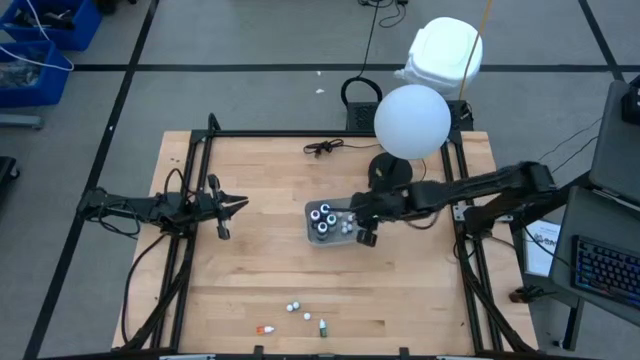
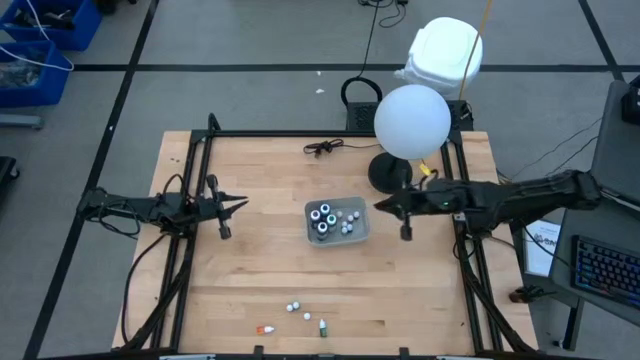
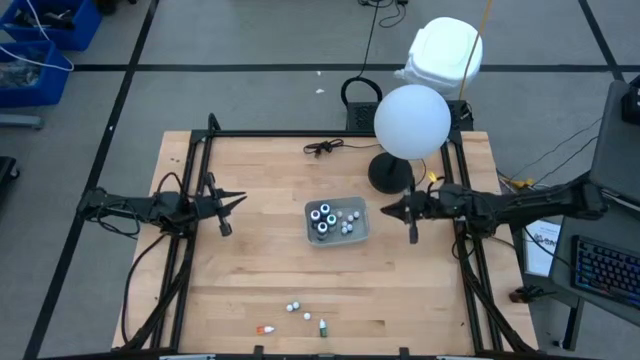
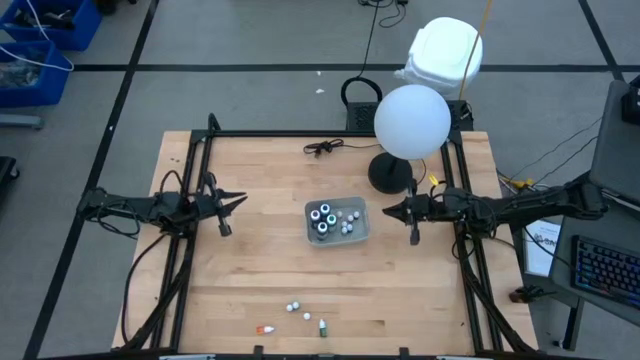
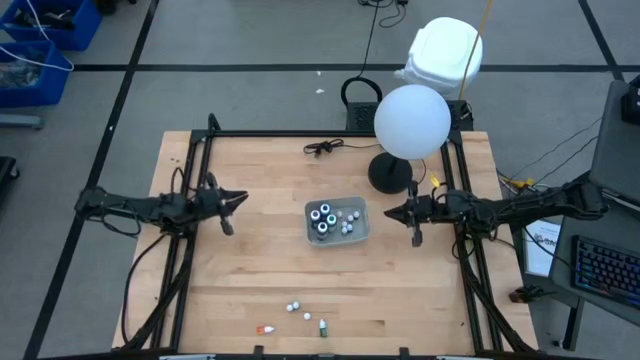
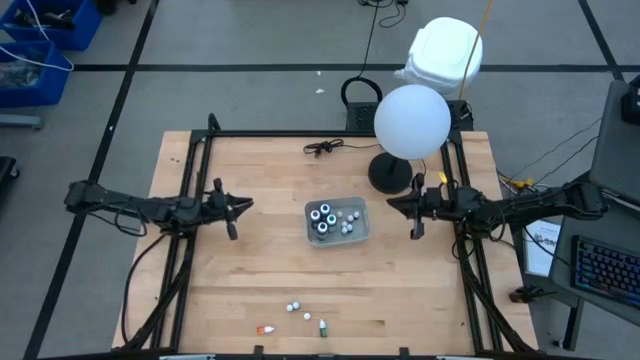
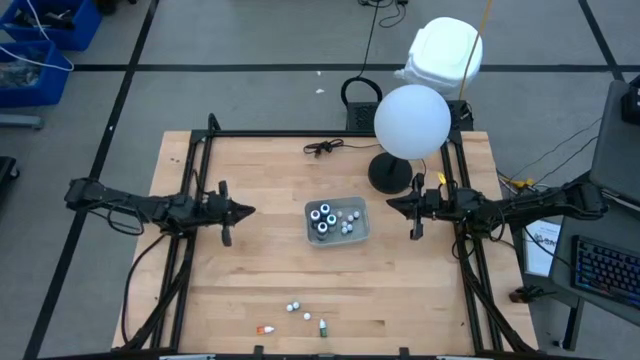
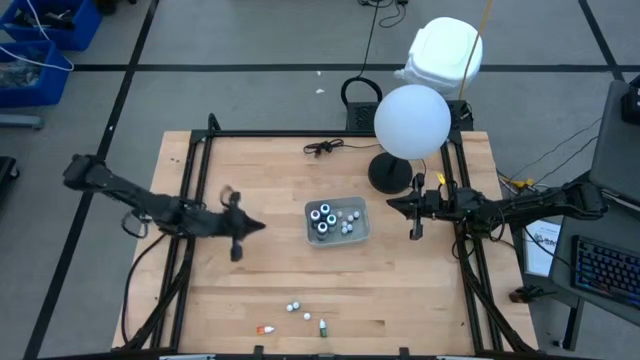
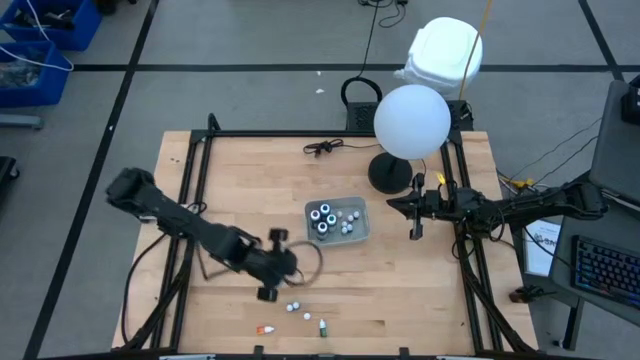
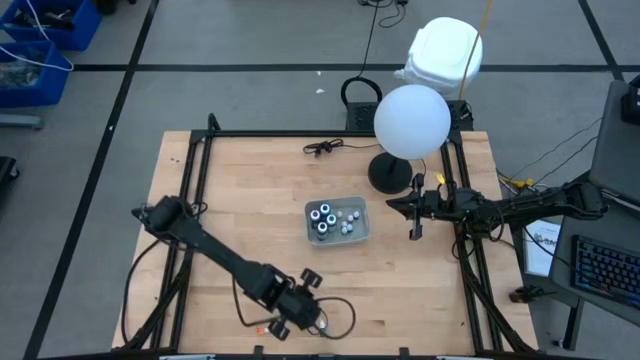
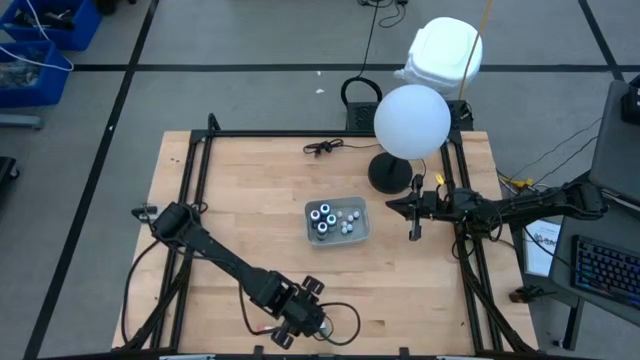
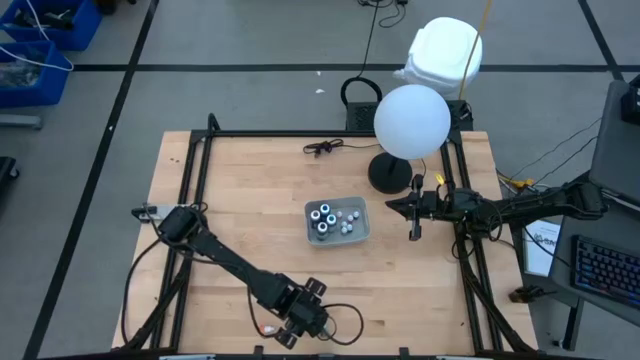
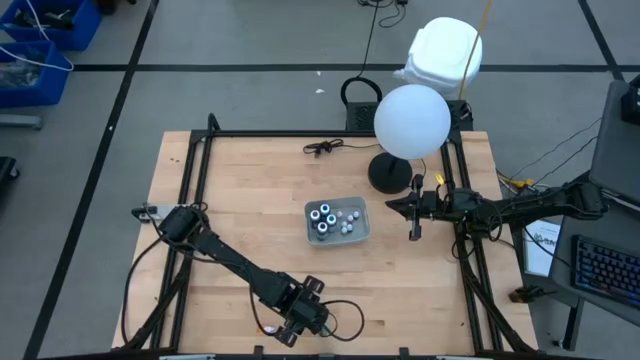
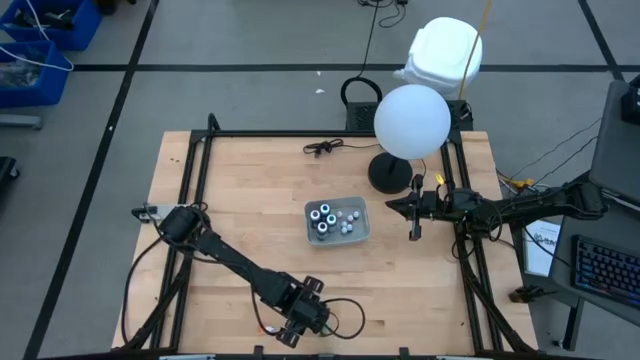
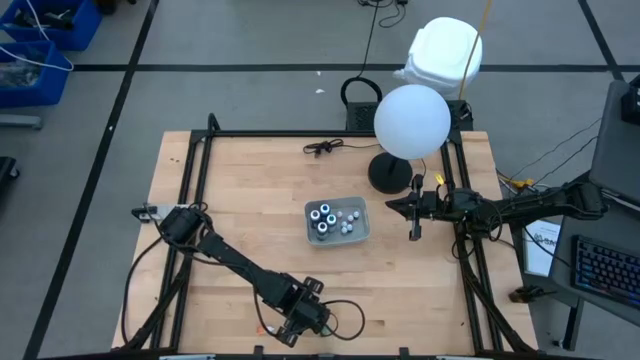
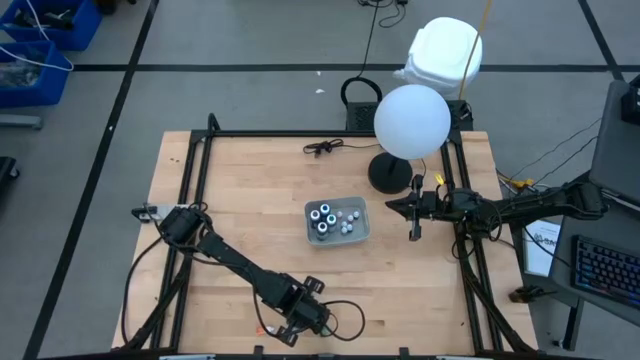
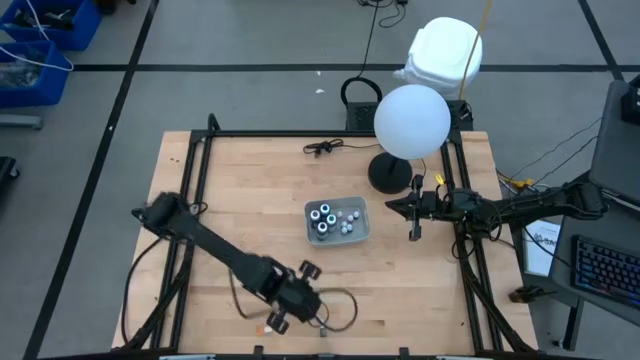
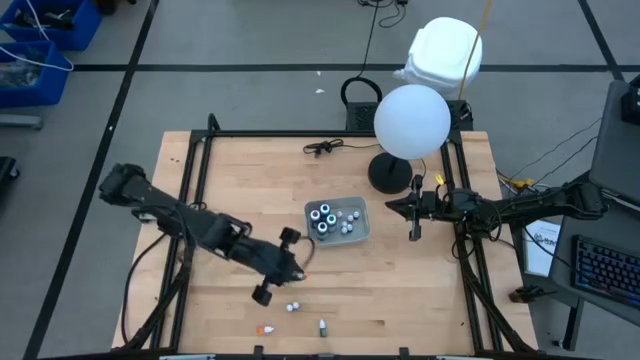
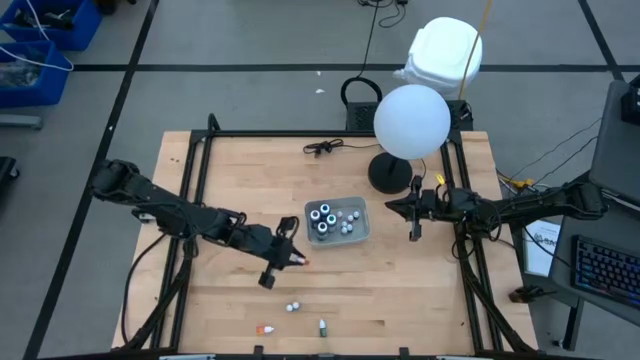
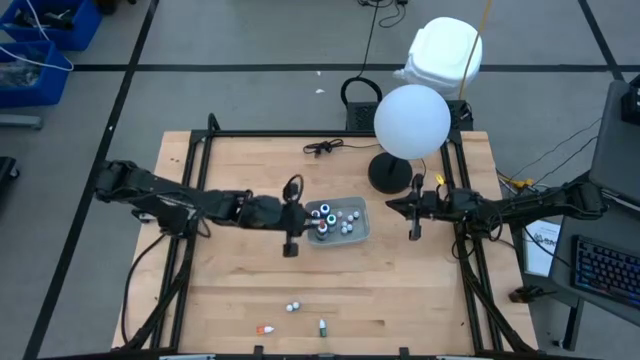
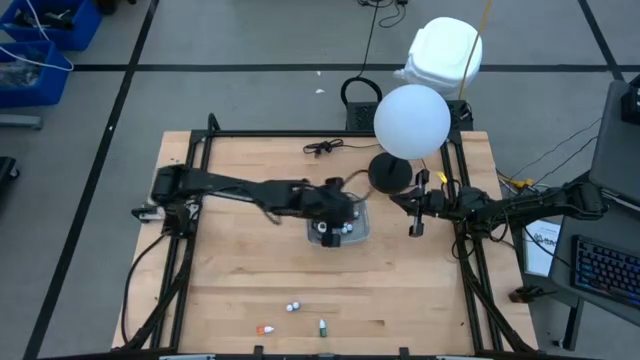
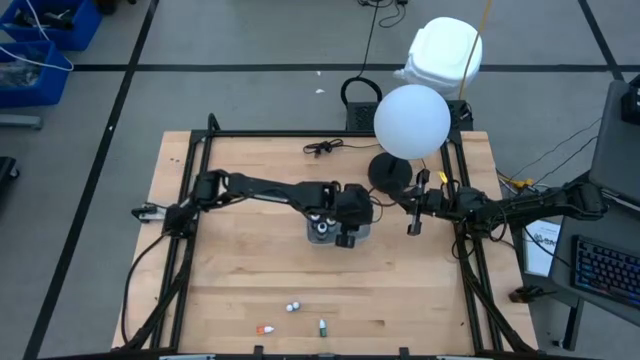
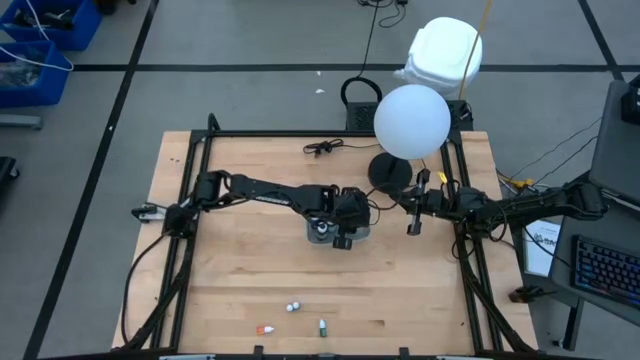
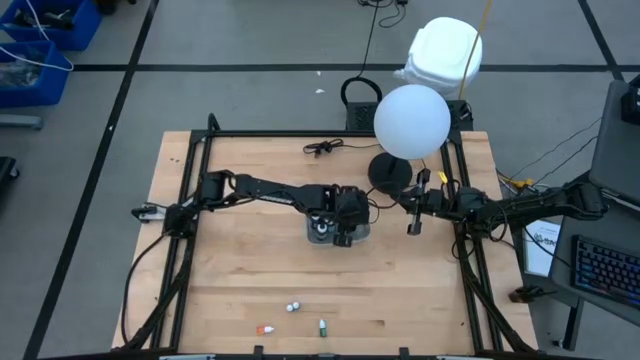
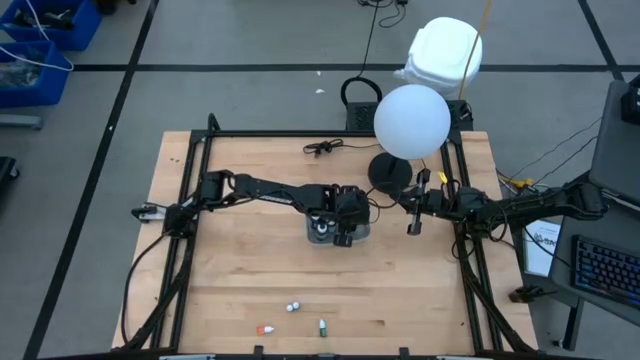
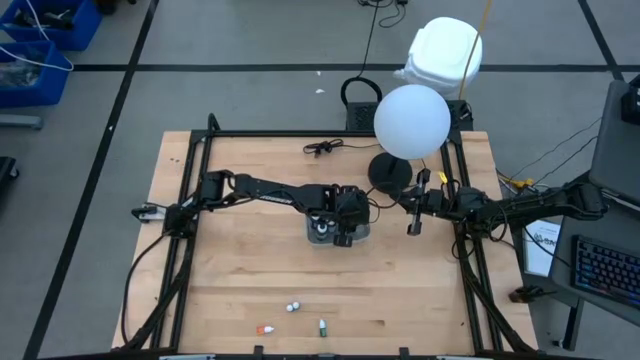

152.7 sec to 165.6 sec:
Task: Pick & Place food coloring
Put the right small yellow food coloring bottle into the gray bin

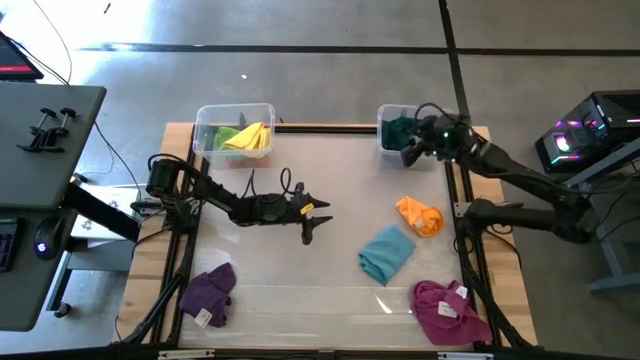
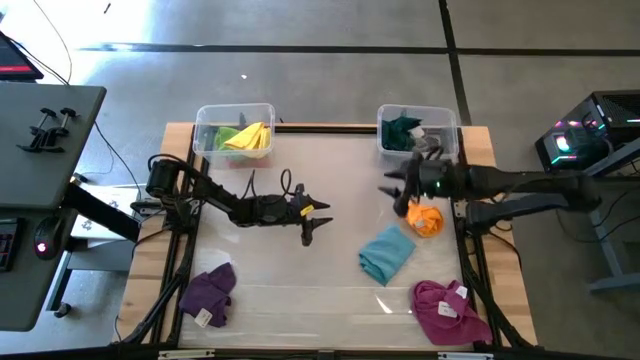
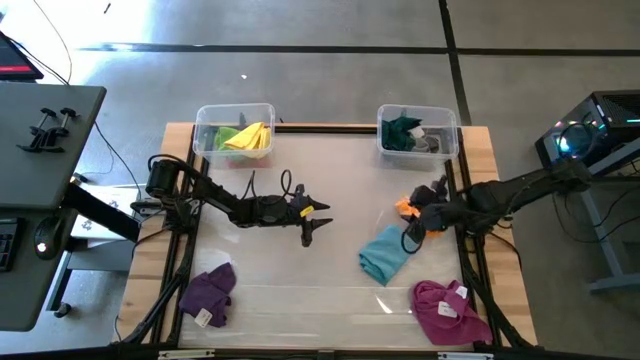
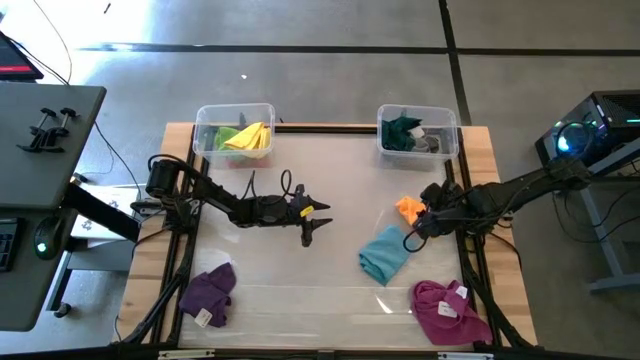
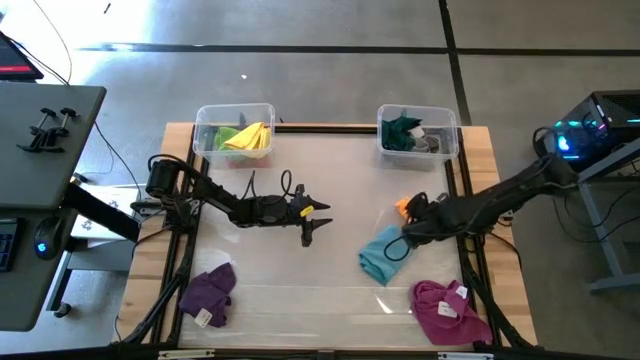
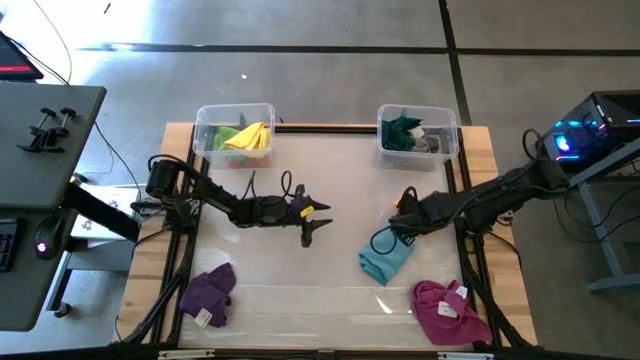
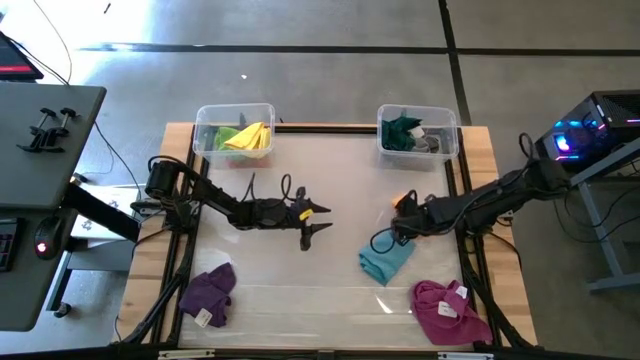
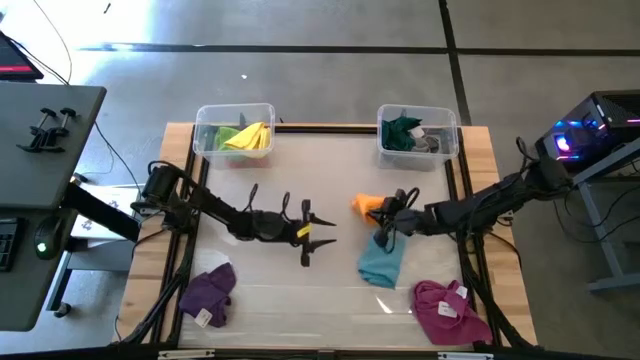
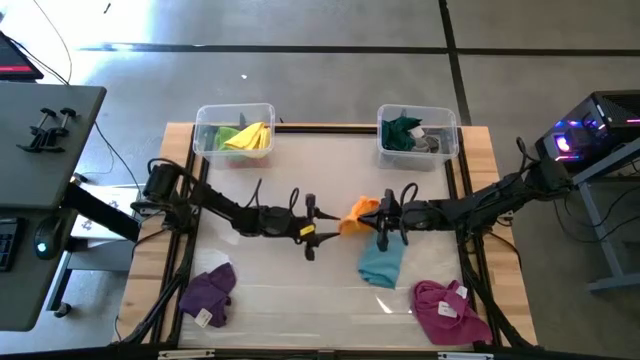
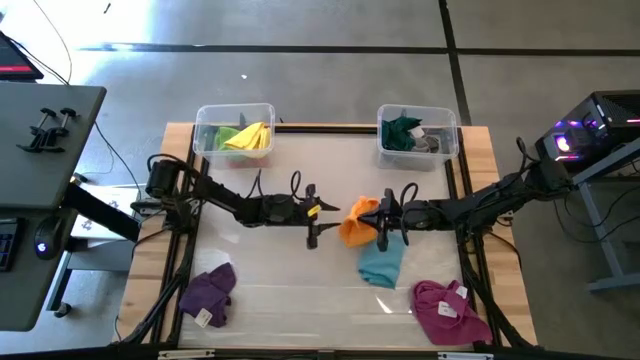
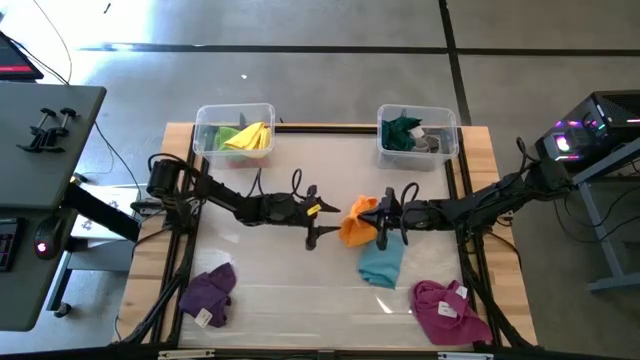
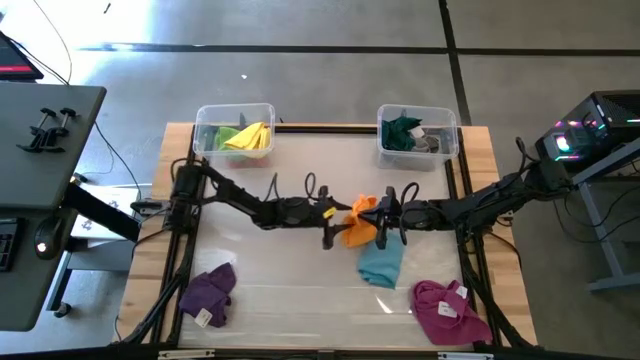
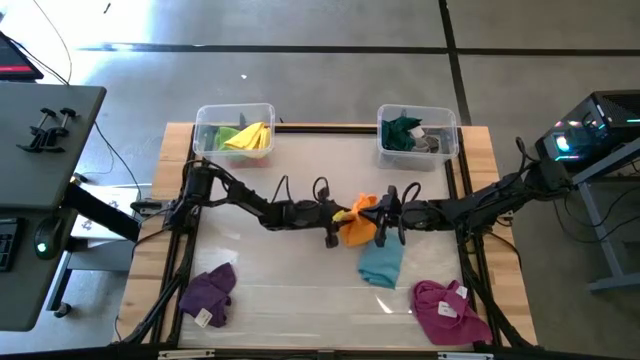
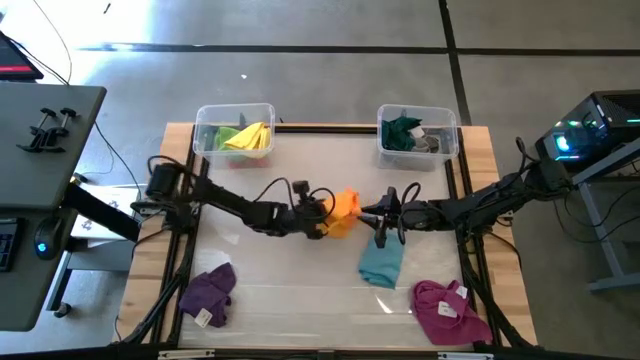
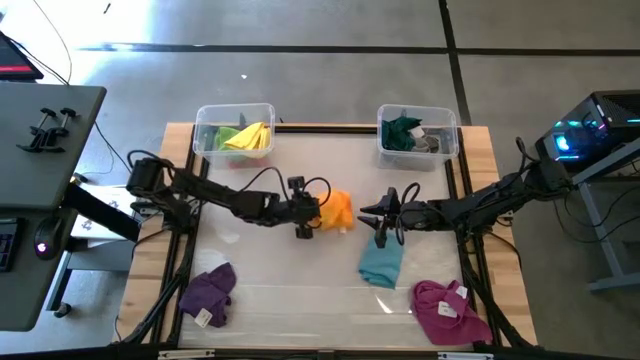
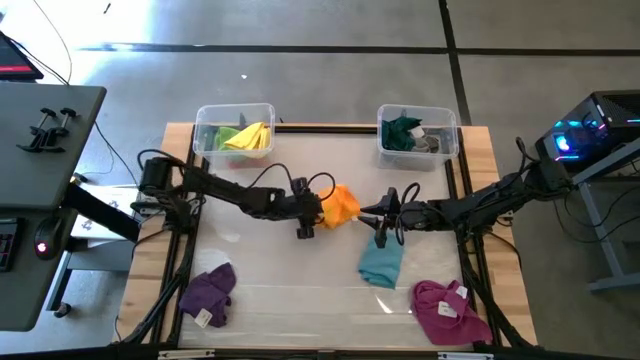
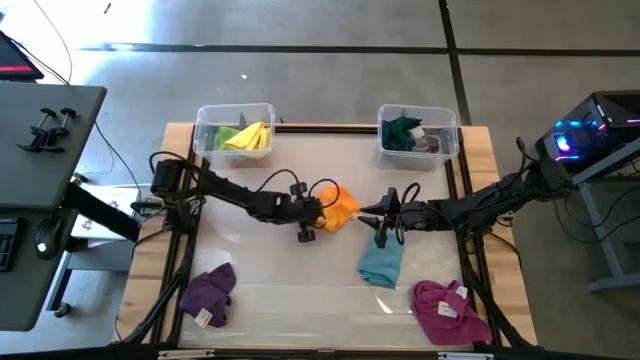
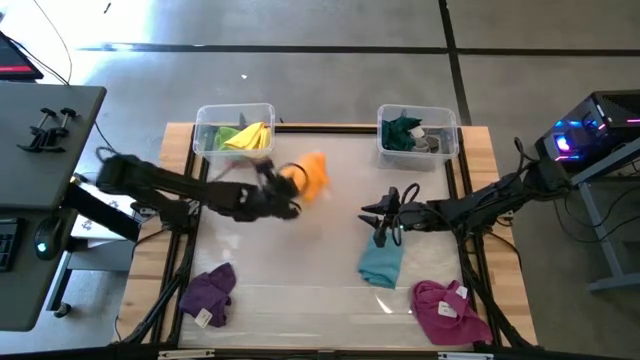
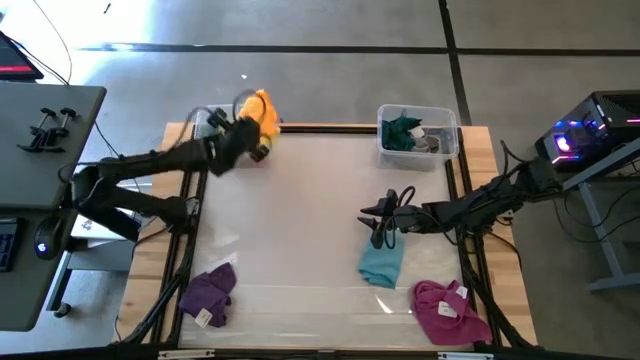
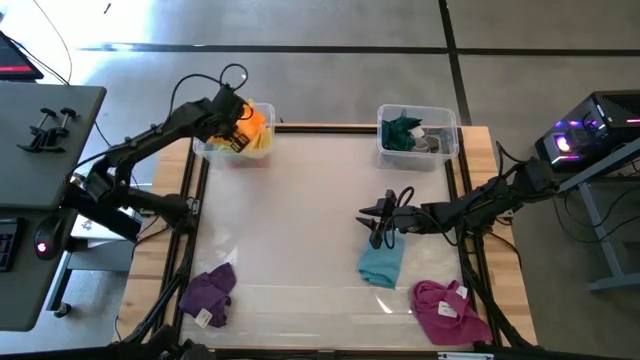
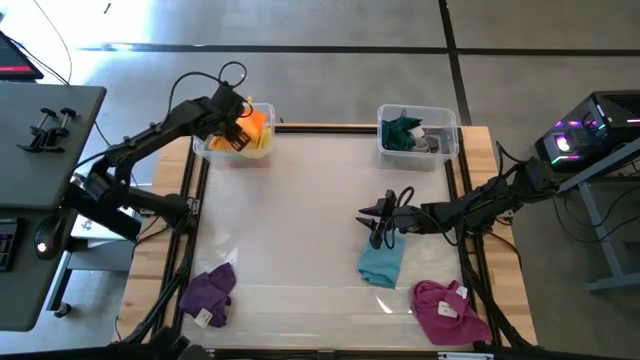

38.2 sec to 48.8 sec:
Task: Sort towels by color in basket
Put the orange microfiber cloth into the left transparent bin
